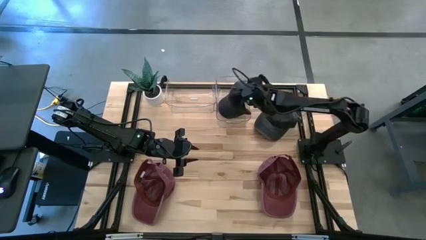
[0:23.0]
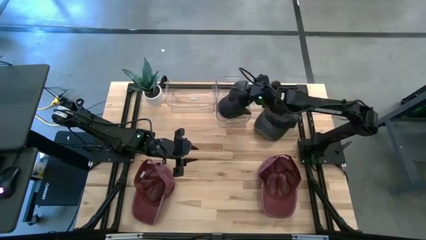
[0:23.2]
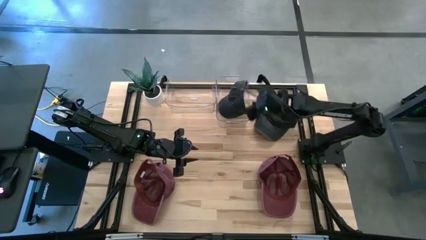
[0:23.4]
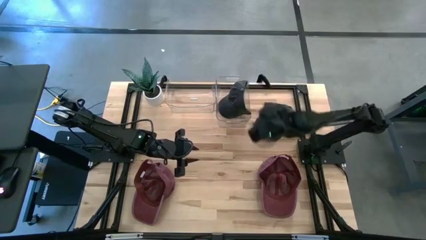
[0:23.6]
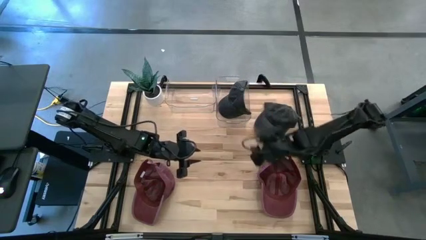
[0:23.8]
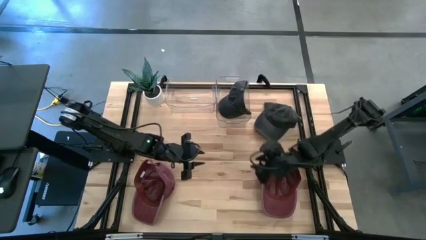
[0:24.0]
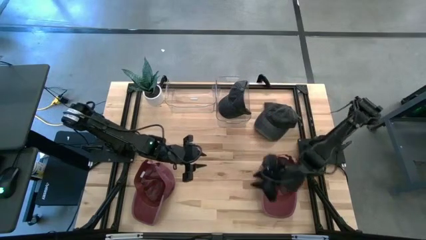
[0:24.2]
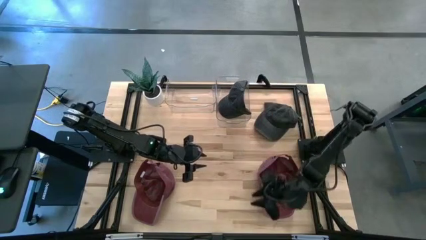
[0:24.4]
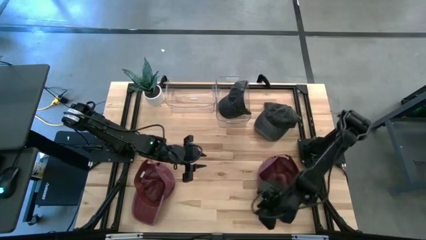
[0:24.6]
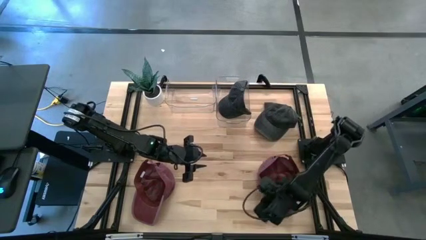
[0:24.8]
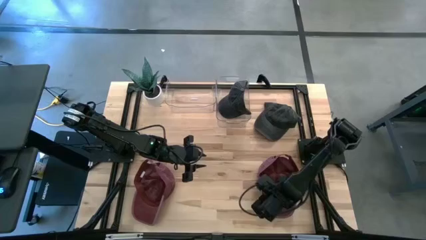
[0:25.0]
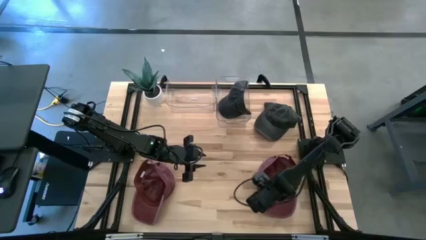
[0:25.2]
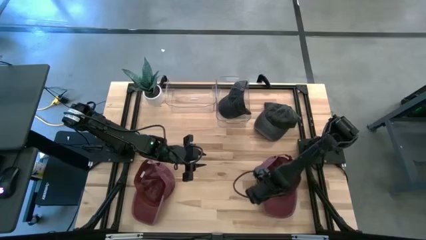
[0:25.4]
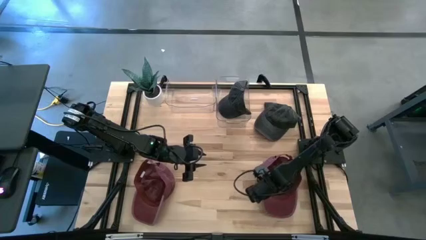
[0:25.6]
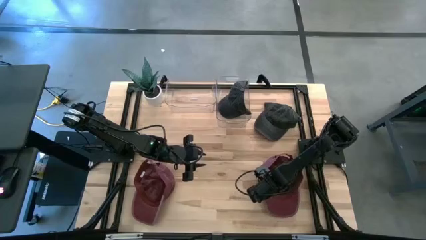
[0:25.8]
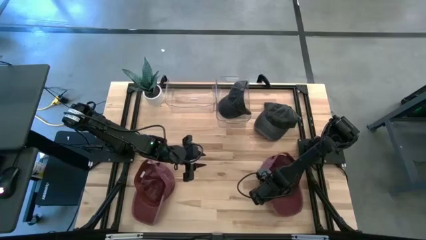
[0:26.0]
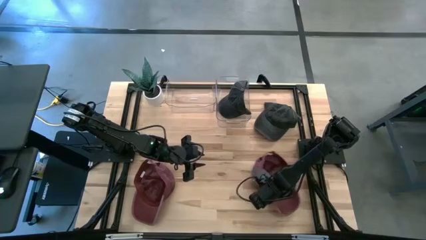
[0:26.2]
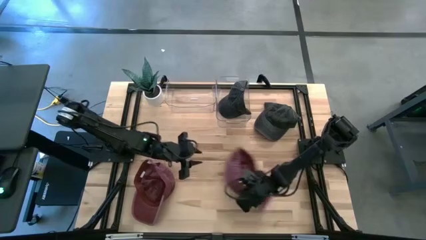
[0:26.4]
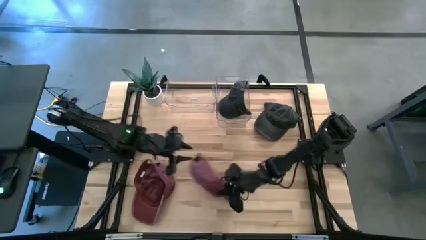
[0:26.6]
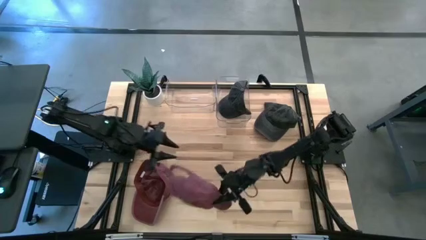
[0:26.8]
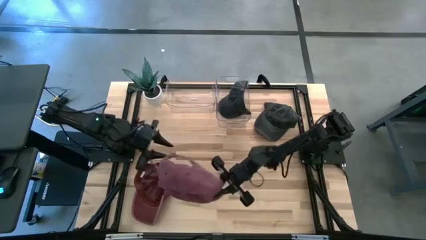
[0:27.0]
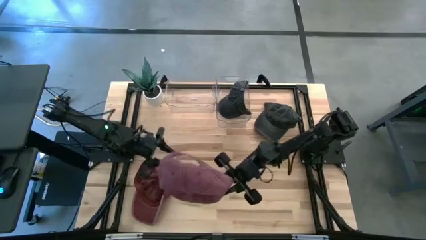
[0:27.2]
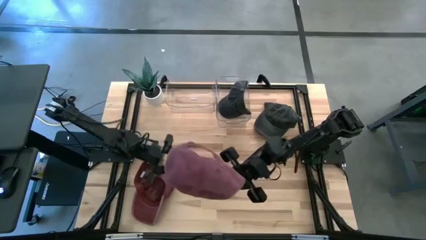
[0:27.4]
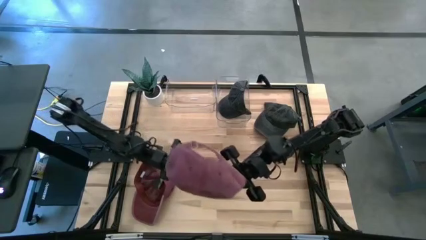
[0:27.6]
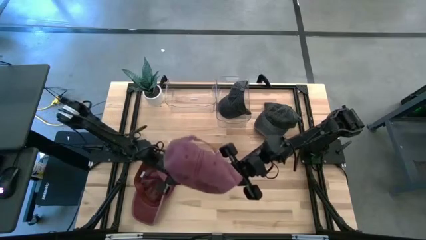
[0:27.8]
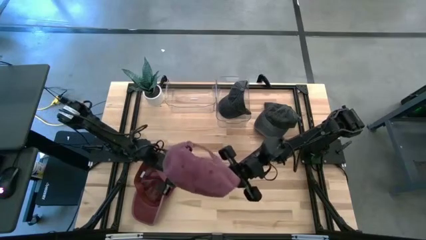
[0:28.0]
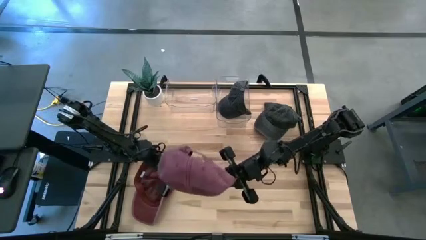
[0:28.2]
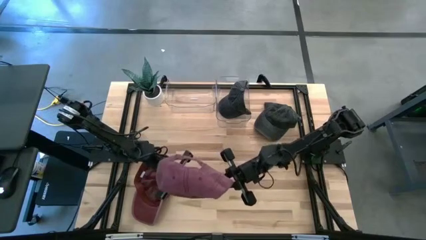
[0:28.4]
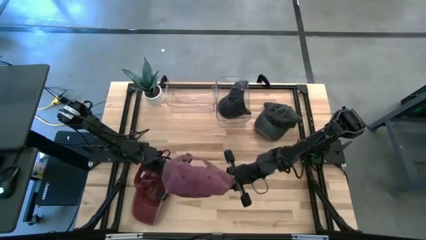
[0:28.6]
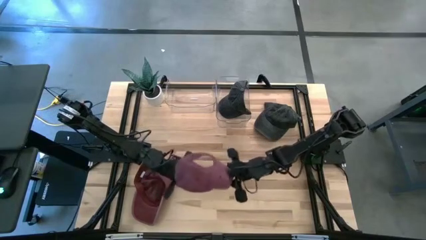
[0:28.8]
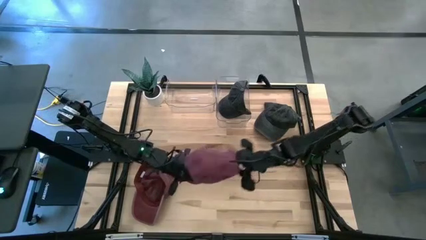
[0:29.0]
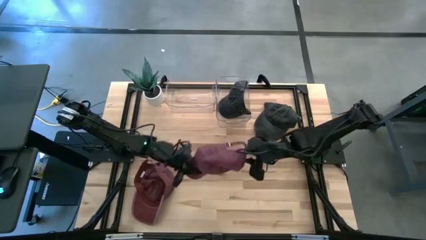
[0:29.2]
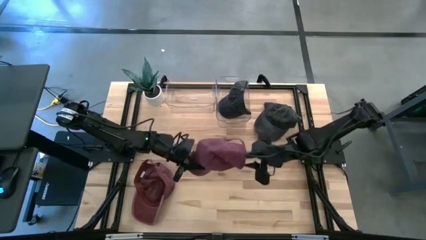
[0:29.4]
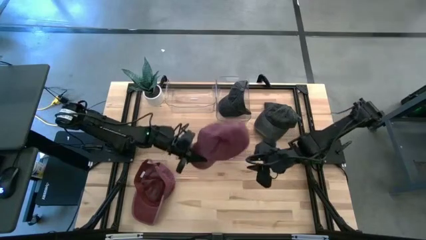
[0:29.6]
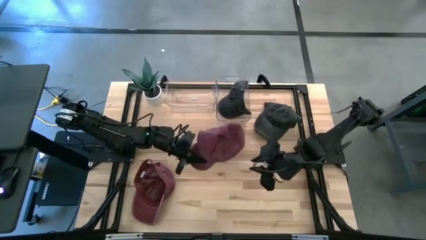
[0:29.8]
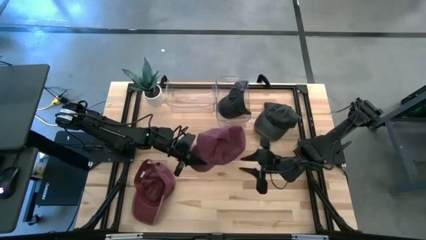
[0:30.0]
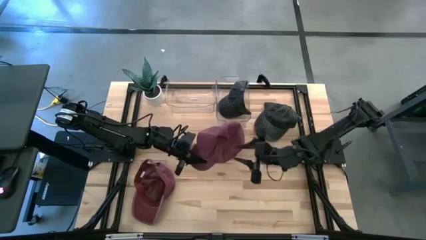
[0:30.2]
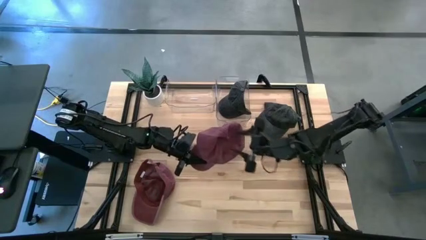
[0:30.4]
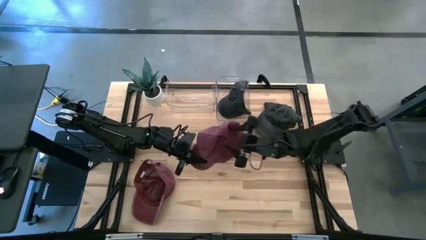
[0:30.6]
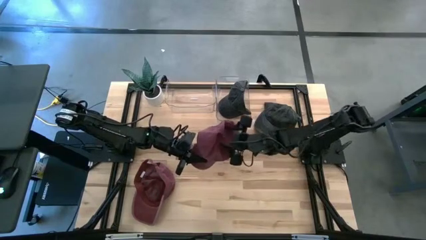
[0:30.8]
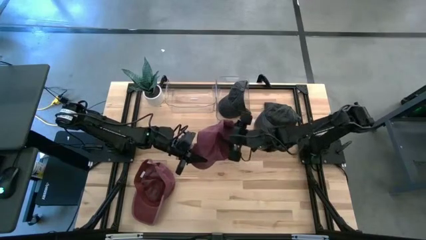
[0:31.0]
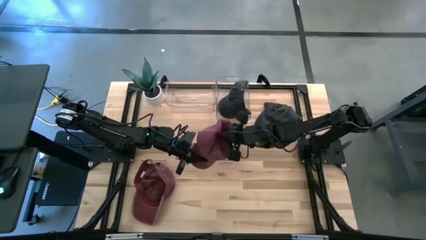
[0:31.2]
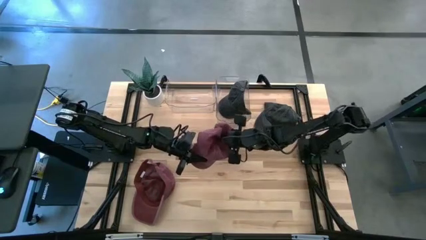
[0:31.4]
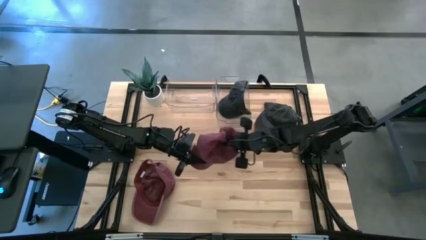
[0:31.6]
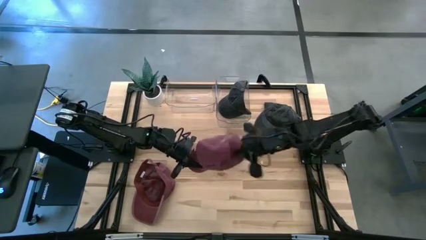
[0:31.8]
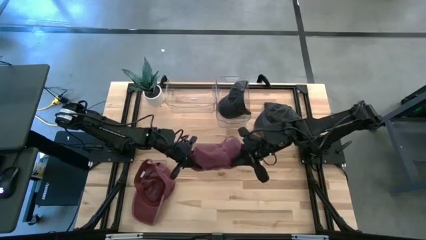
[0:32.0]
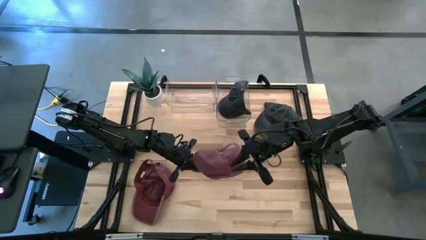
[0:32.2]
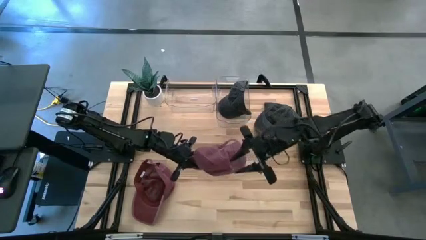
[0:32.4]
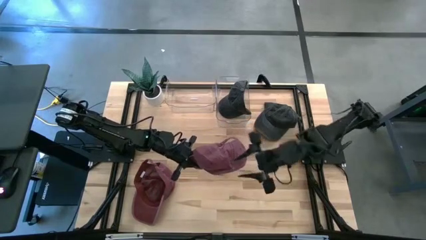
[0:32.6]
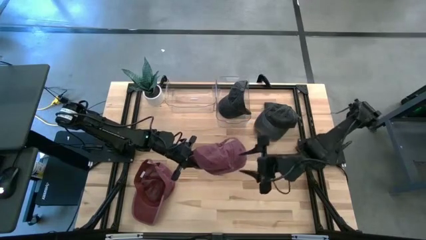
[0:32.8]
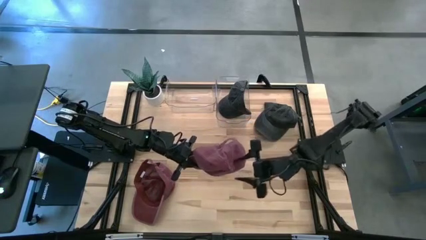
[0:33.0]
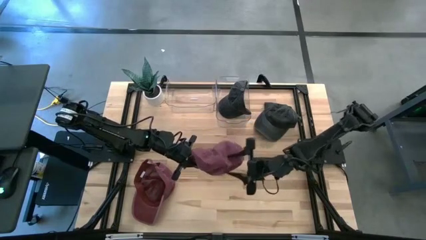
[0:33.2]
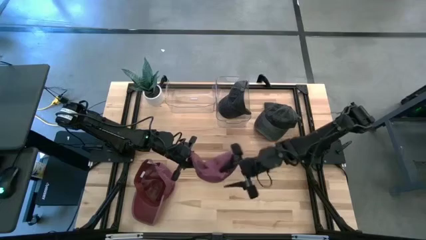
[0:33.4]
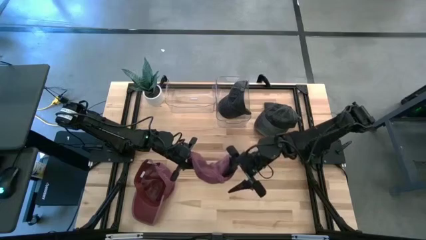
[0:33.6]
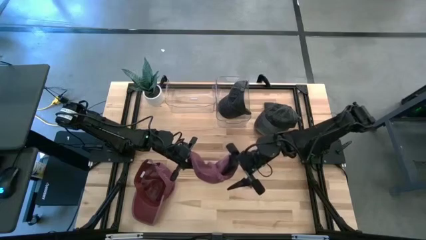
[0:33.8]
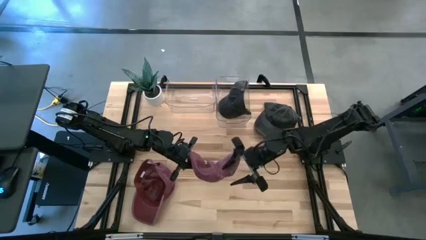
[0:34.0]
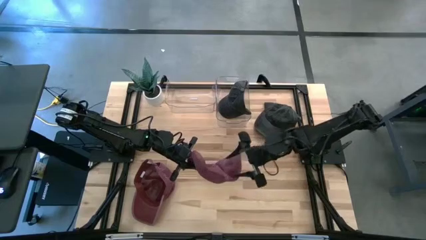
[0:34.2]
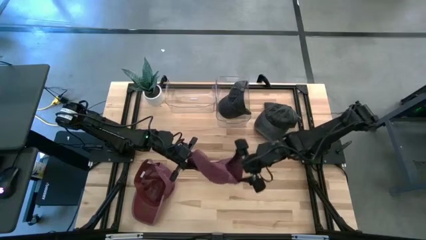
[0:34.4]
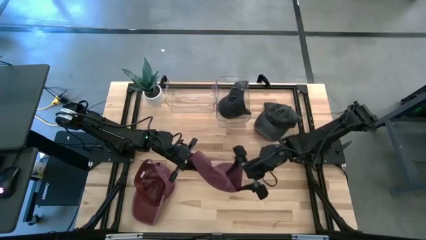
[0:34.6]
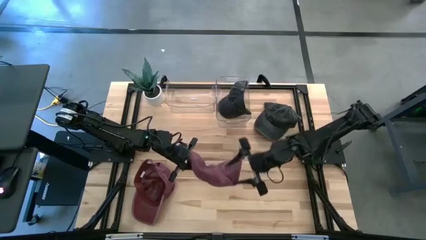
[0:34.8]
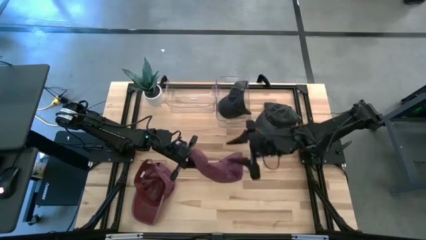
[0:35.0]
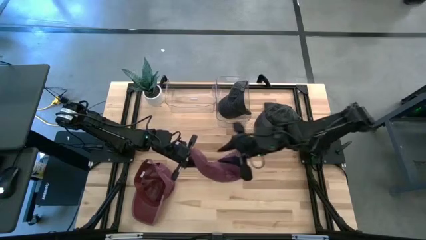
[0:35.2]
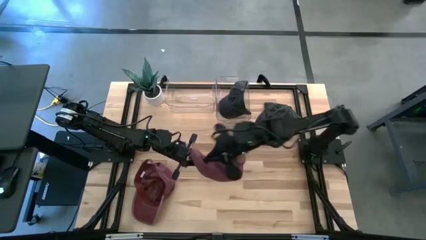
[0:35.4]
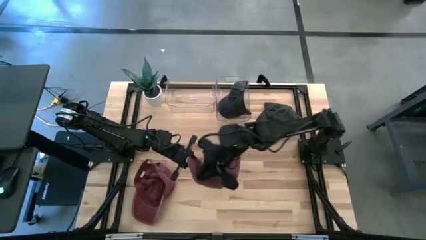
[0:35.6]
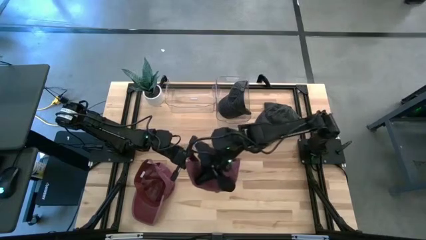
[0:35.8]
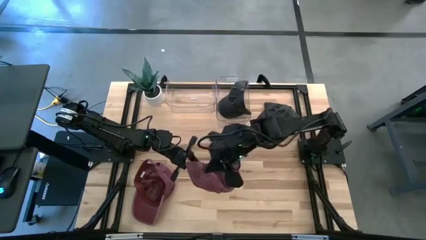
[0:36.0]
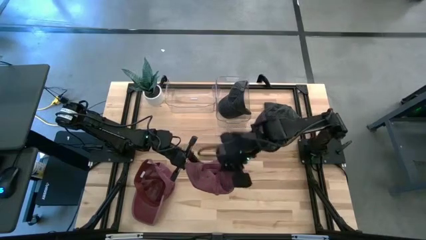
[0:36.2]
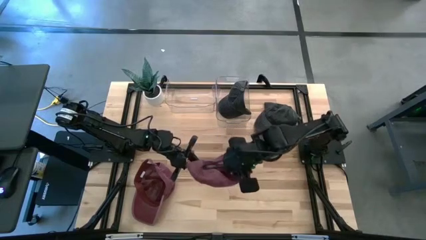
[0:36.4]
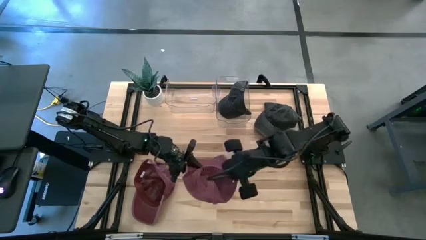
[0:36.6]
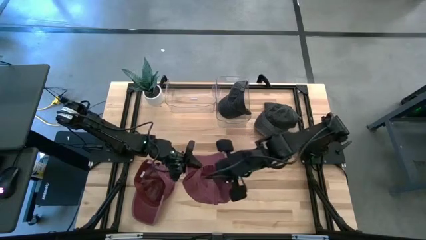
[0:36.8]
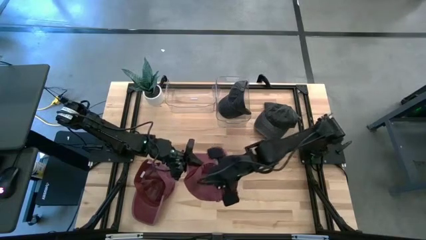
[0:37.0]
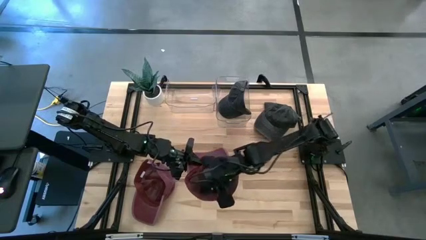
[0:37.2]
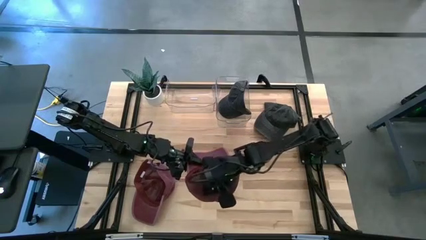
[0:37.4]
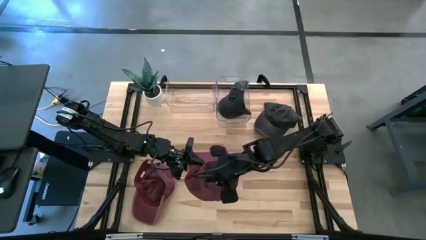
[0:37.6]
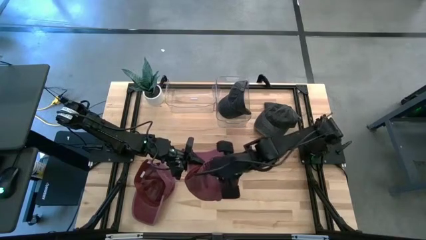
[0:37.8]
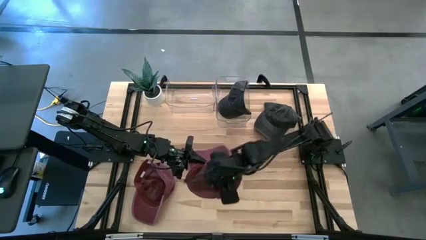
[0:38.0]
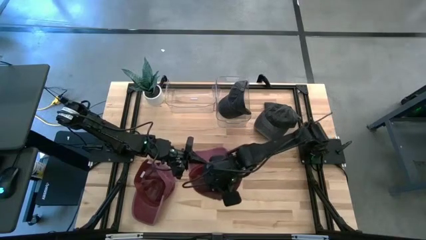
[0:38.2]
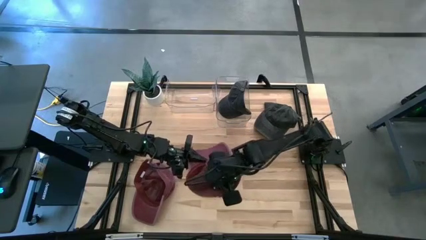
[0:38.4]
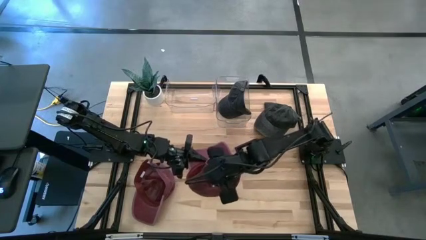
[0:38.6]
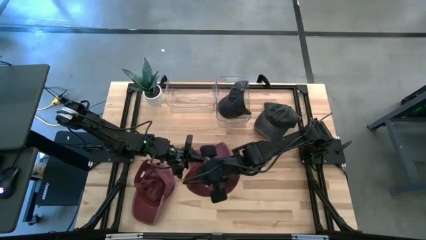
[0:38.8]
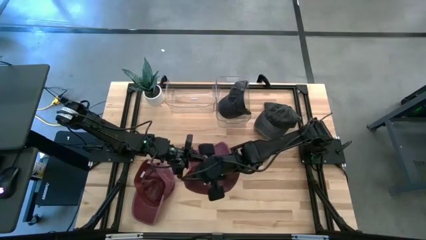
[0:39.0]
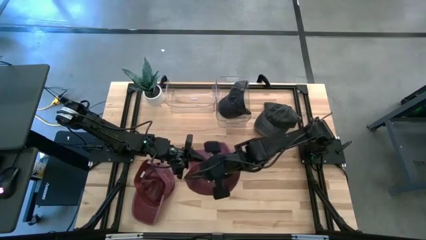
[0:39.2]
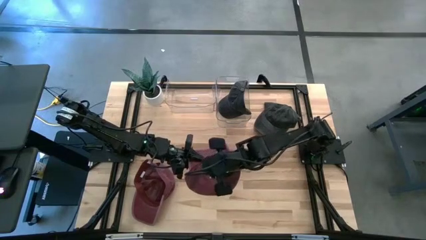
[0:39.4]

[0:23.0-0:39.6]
Task: Pick & Place hat
Put the right red cap into the left transparent bin
